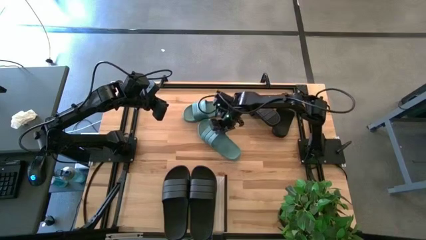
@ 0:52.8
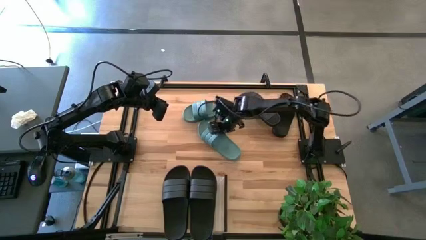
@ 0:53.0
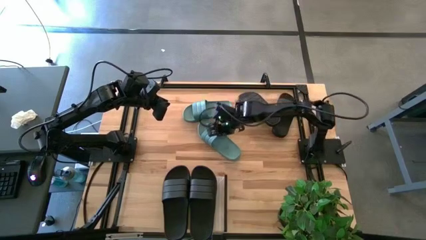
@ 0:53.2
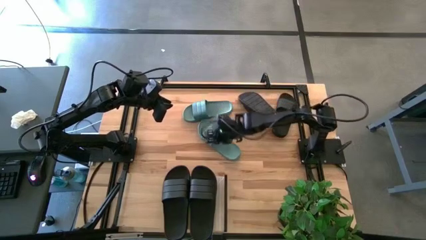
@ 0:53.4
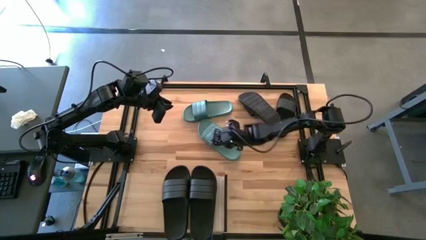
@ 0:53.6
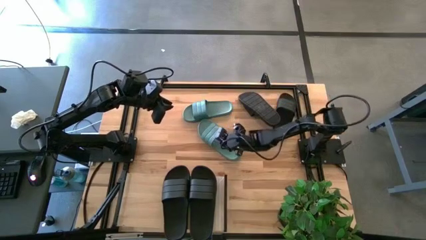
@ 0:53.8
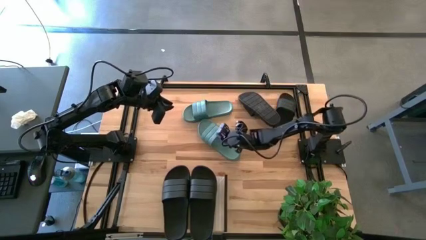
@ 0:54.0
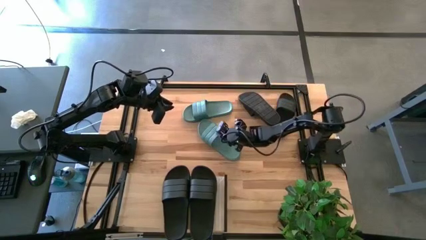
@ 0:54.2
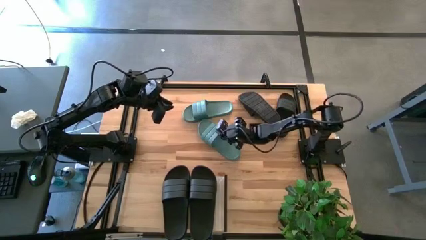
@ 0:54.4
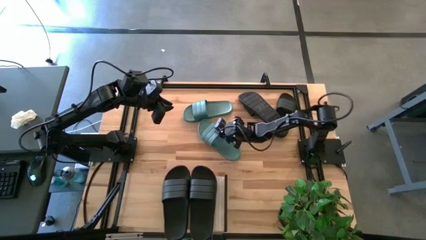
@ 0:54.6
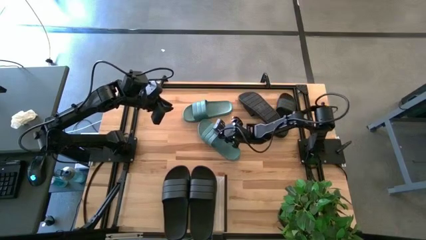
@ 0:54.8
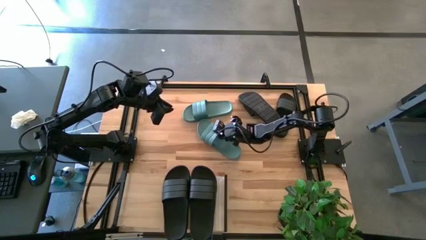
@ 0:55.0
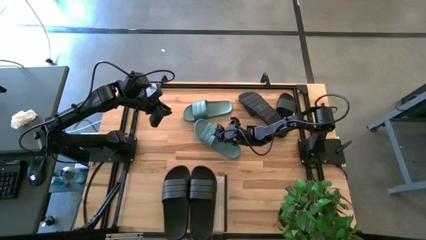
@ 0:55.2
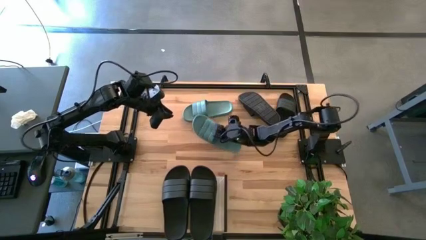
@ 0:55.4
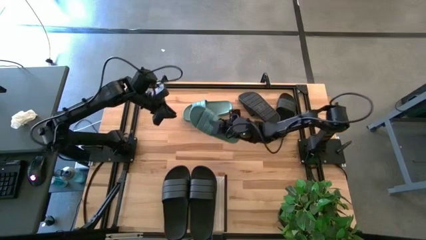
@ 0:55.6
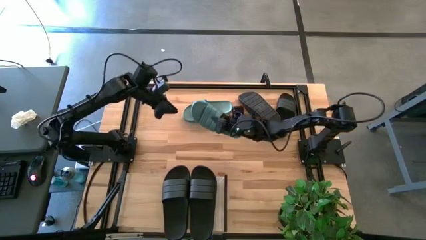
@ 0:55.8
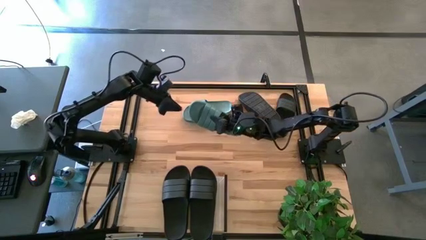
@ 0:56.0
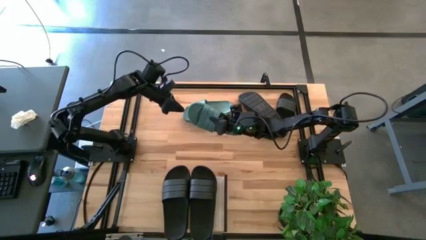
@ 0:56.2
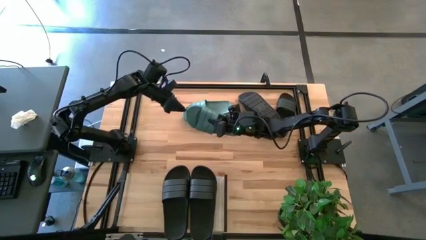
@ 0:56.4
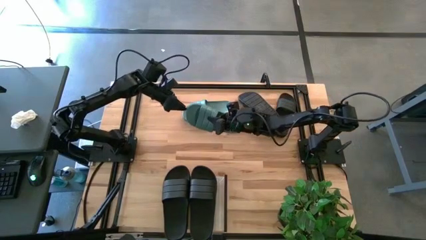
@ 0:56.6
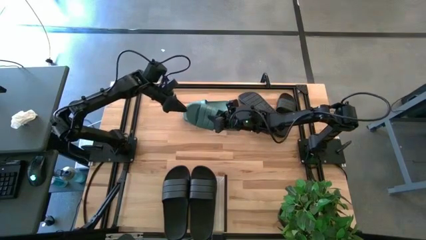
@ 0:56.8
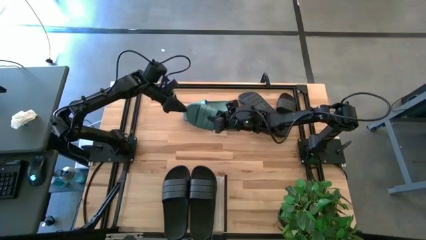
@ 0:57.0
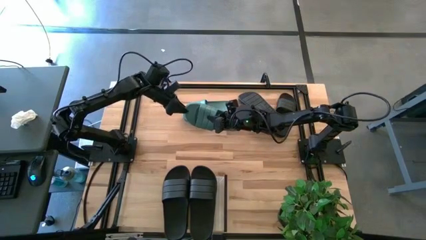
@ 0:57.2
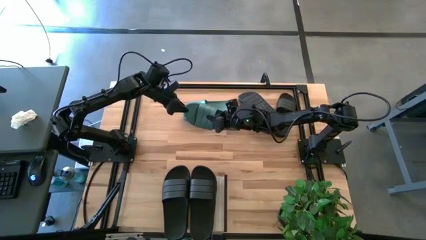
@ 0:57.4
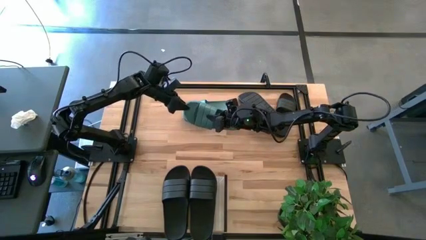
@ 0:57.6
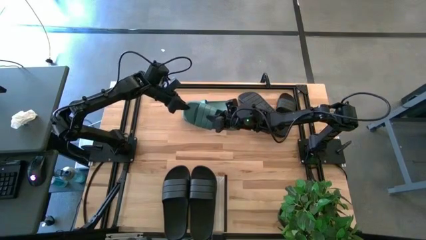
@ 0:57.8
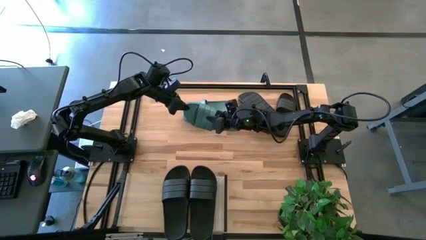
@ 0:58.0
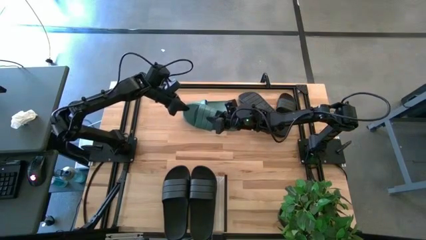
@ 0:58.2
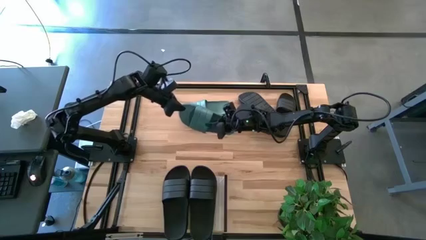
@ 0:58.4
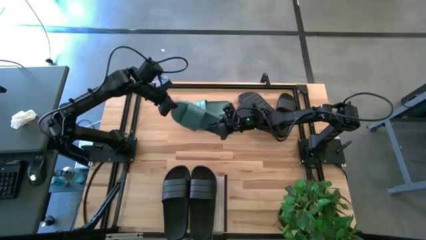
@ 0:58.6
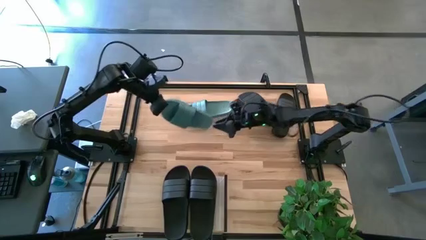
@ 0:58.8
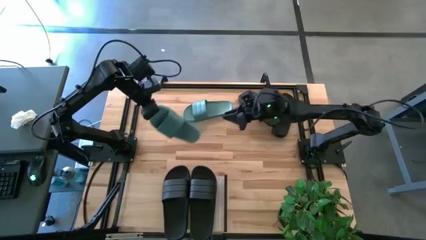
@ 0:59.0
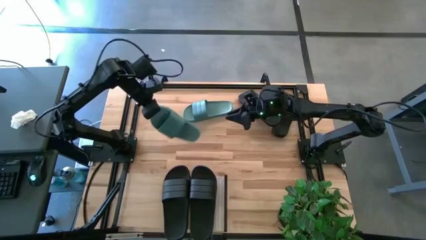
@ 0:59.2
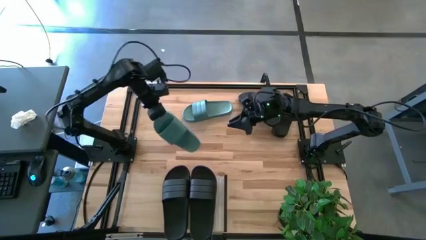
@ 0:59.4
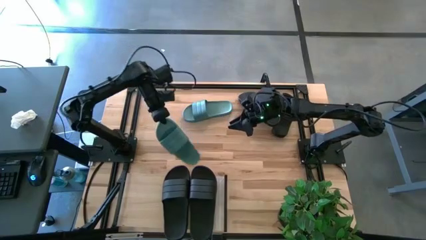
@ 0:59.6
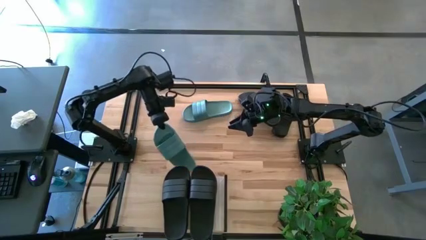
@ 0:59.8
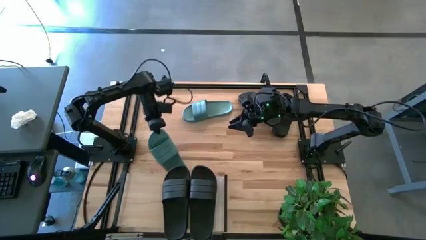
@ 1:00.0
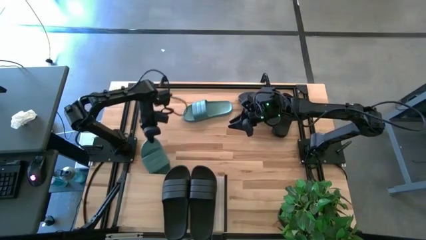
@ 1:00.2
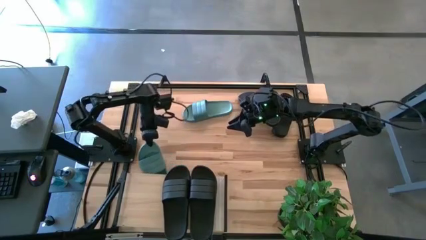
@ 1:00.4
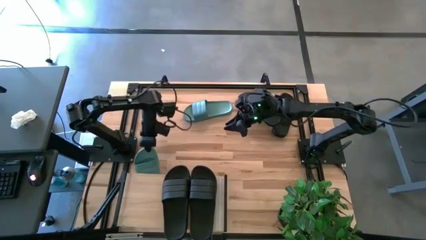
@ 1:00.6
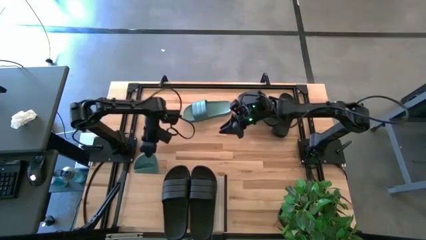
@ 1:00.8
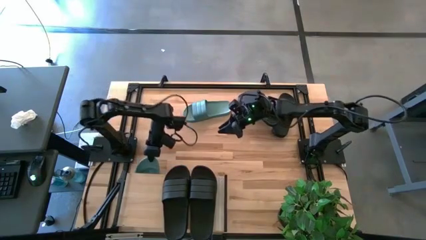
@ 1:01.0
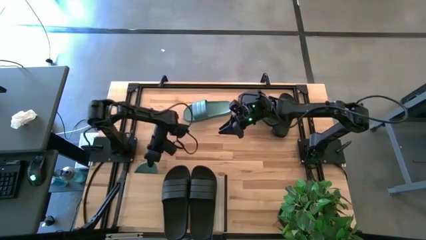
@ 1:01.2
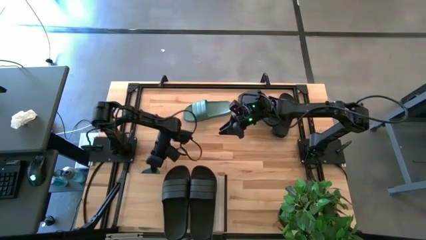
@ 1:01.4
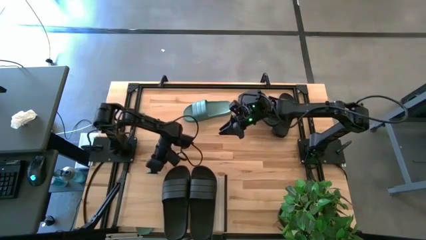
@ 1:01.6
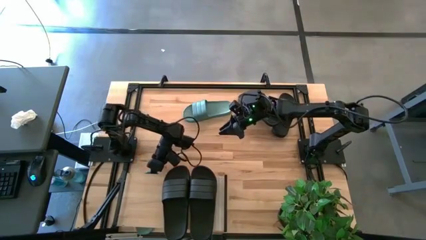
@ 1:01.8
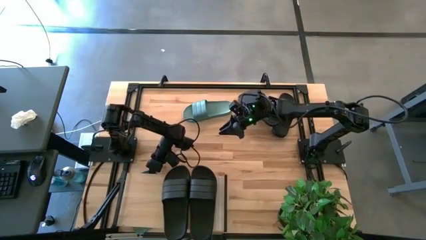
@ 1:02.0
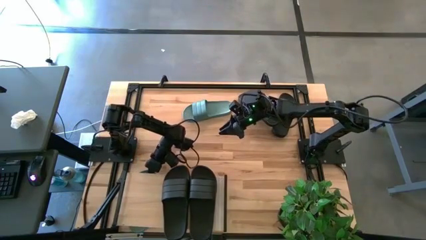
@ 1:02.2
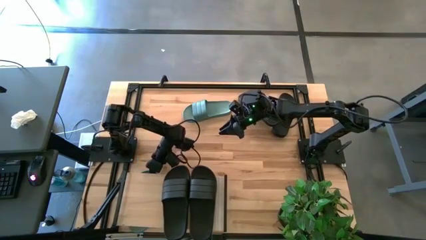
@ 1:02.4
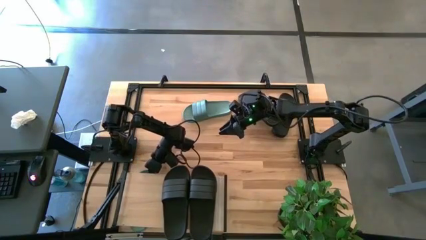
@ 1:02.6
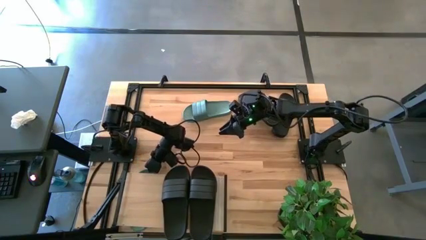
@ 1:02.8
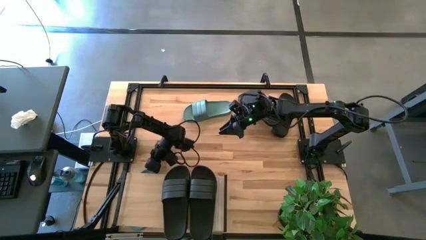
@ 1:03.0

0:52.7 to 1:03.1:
Task: Pick and place slides into the shelf
Put the green slipper under the shelf

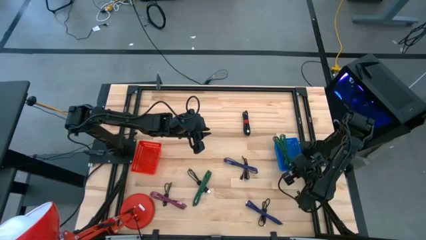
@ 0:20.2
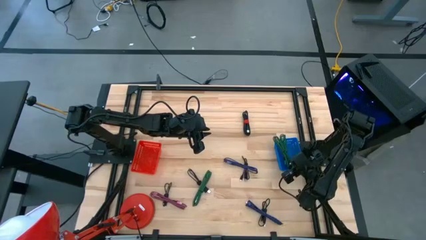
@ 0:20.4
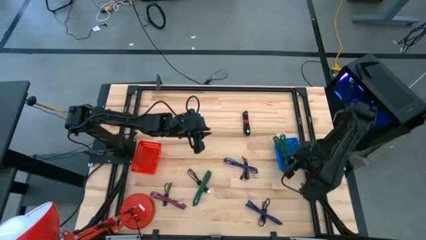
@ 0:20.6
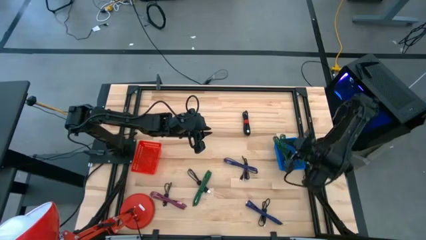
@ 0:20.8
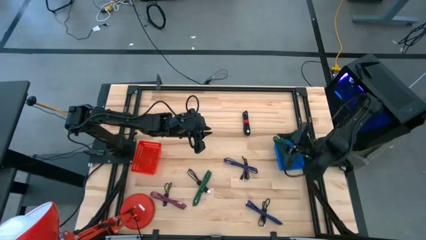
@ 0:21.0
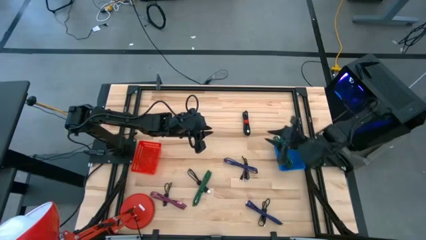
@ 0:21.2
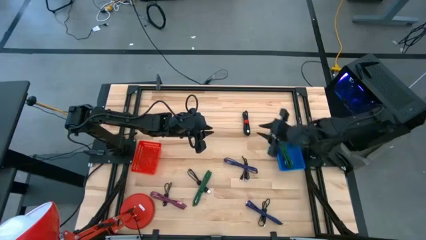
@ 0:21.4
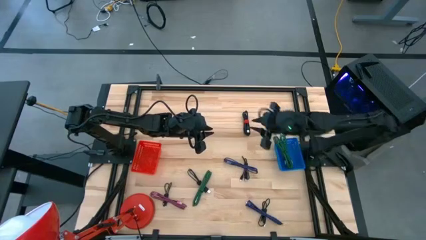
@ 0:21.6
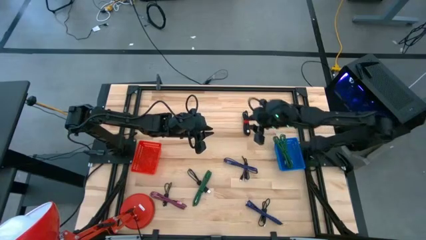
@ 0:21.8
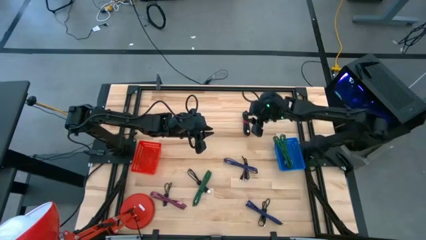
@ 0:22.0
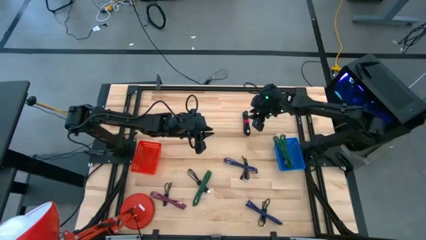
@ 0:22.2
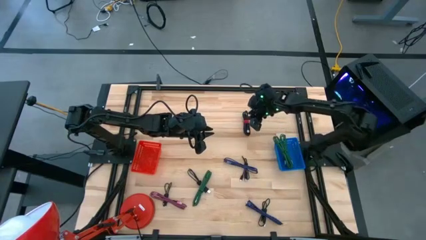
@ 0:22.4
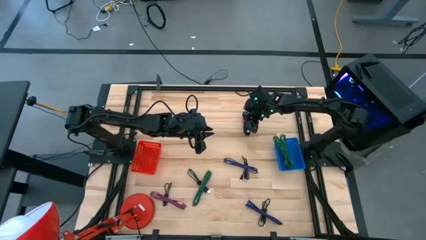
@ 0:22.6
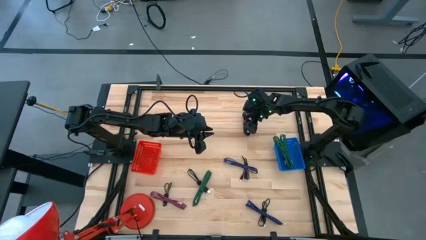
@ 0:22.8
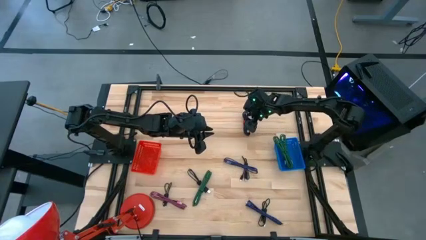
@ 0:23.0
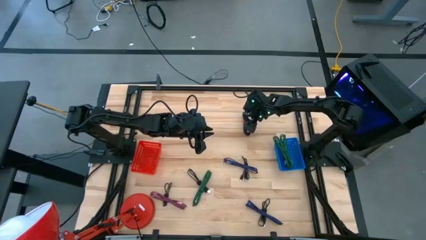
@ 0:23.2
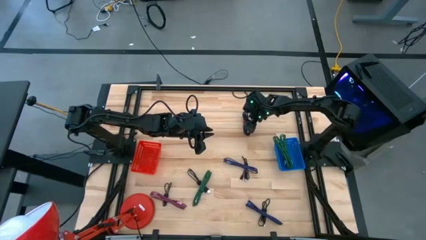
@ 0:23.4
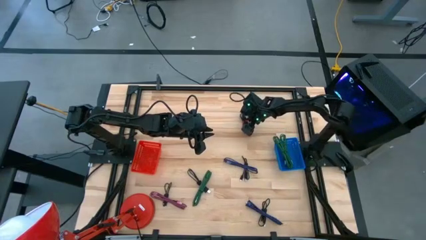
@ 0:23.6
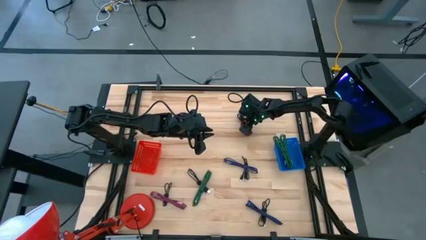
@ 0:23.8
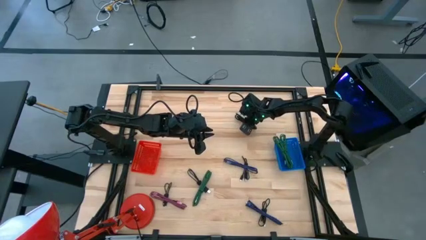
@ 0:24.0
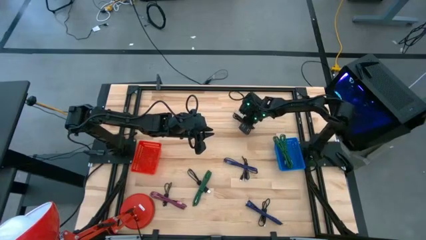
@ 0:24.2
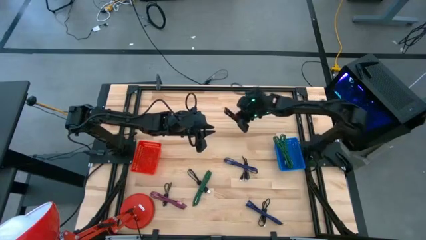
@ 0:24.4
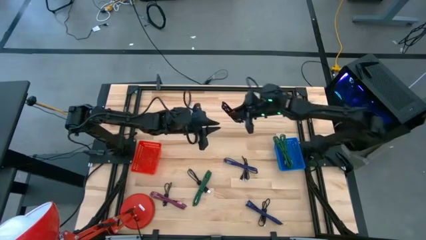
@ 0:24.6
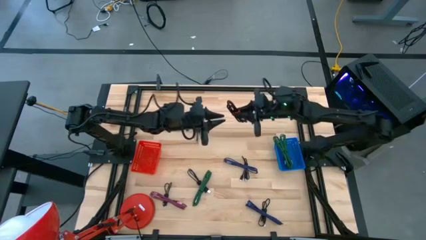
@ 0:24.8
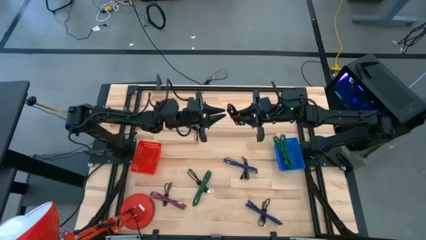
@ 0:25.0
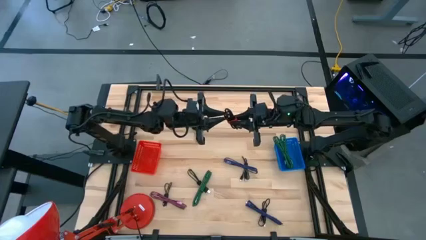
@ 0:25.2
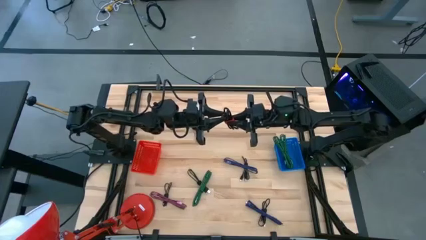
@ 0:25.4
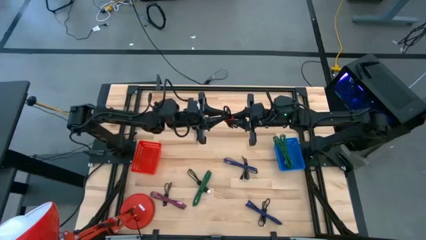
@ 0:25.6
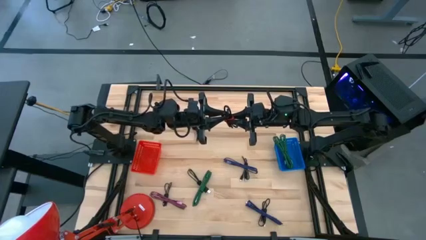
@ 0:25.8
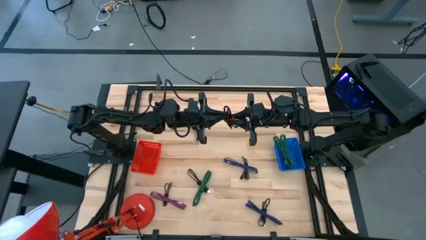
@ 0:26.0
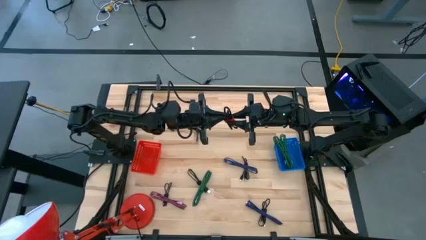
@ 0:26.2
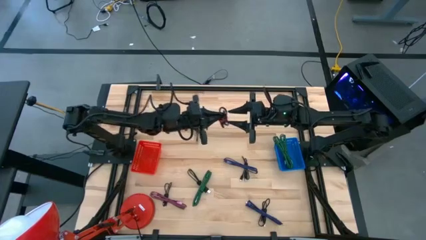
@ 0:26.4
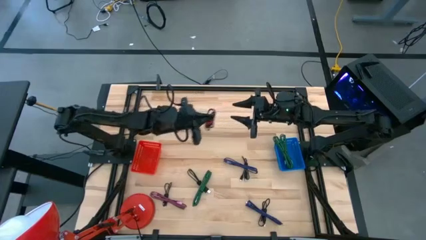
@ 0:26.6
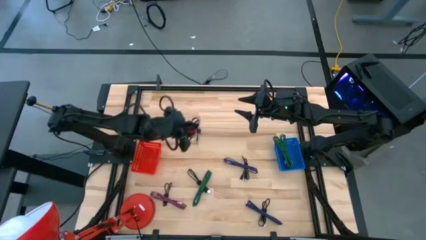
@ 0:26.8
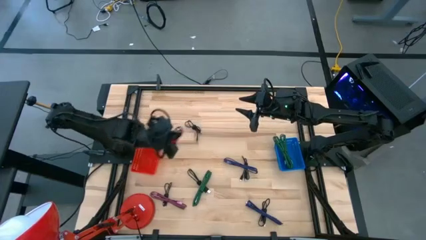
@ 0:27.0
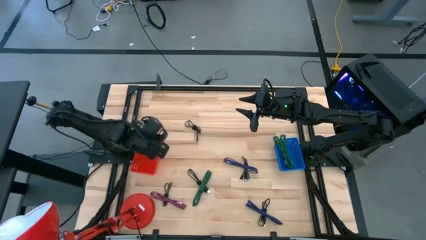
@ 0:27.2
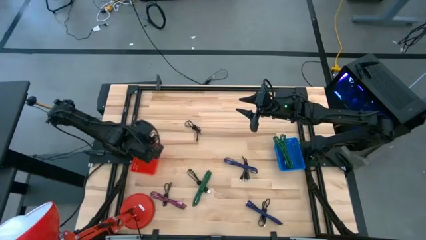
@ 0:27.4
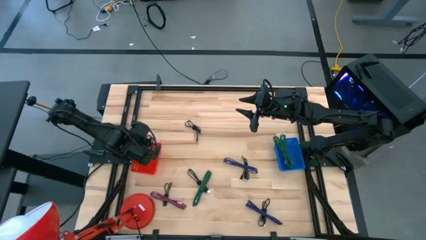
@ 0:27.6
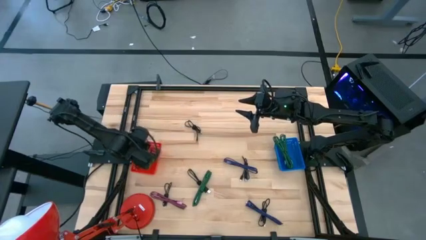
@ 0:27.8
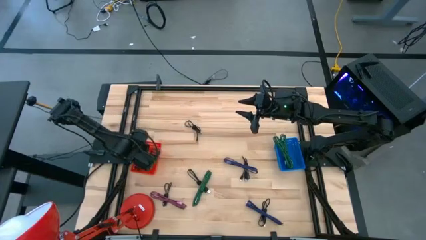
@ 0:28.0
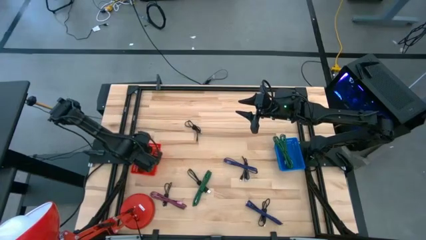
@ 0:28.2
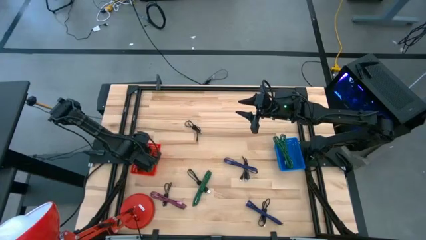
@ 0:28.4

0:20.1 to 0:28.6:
Task: Pick & Place USB Port
Put the black charger cable into the red bin
